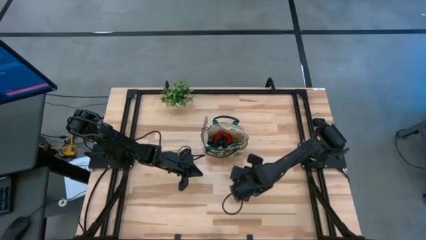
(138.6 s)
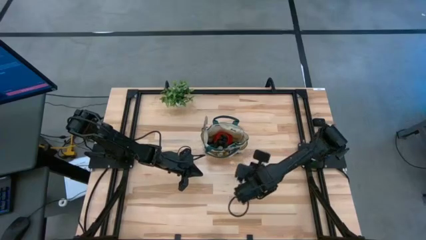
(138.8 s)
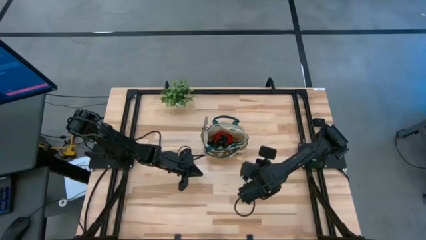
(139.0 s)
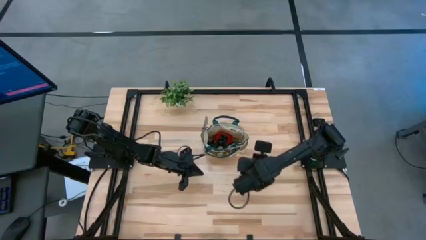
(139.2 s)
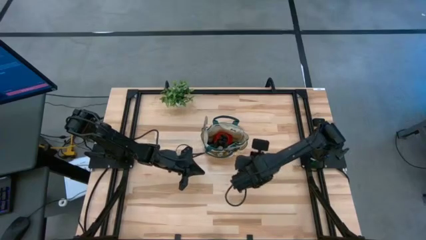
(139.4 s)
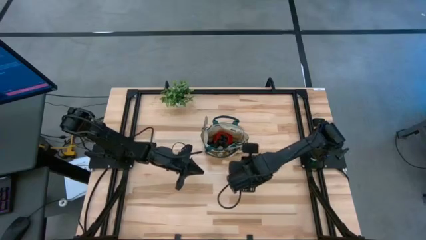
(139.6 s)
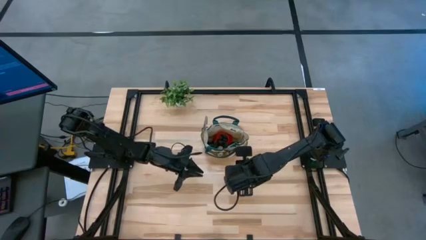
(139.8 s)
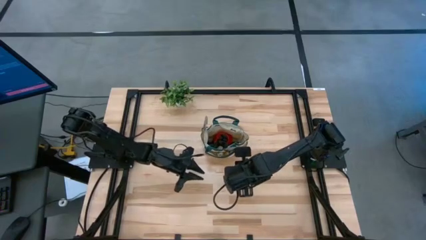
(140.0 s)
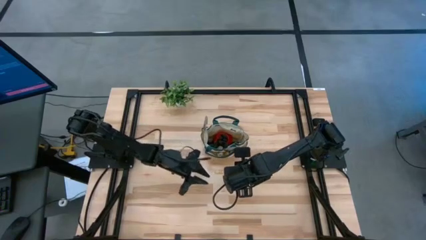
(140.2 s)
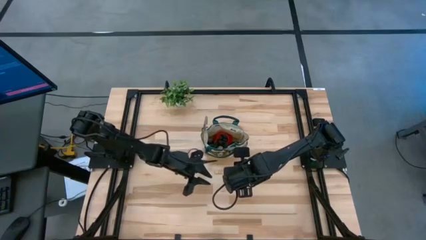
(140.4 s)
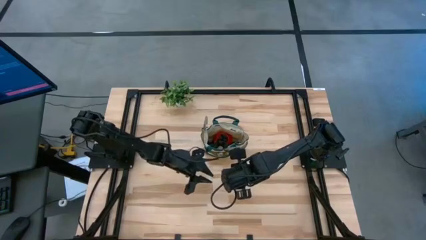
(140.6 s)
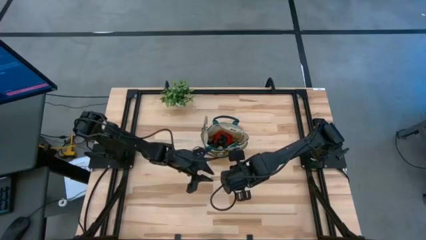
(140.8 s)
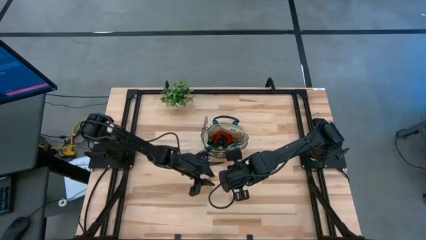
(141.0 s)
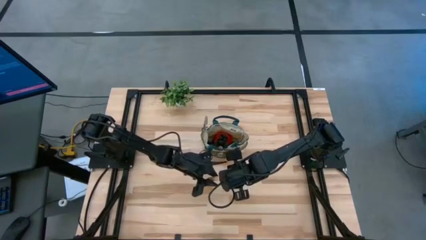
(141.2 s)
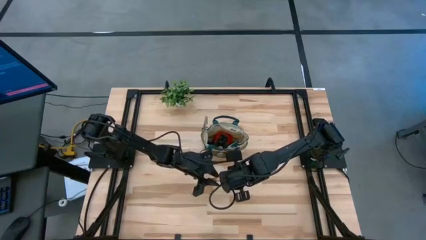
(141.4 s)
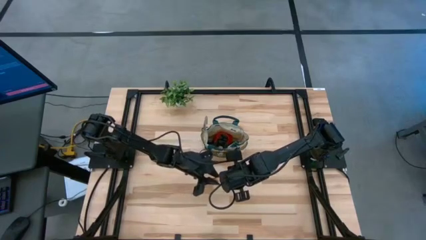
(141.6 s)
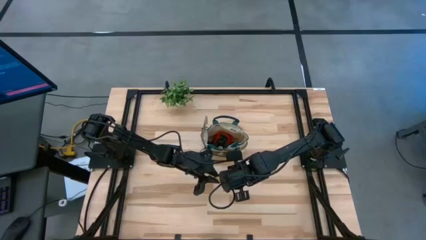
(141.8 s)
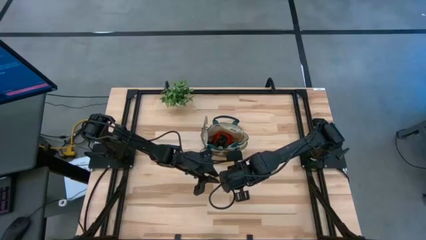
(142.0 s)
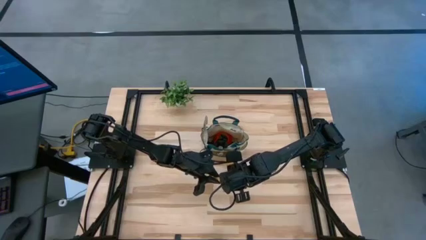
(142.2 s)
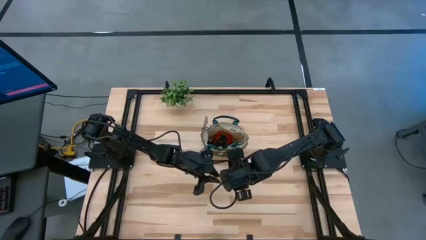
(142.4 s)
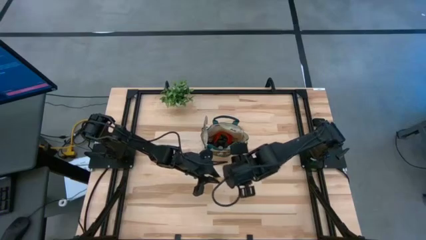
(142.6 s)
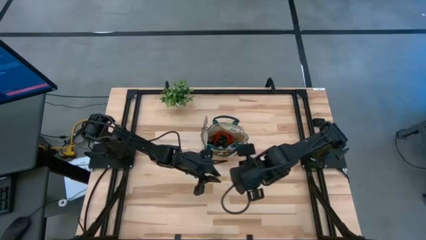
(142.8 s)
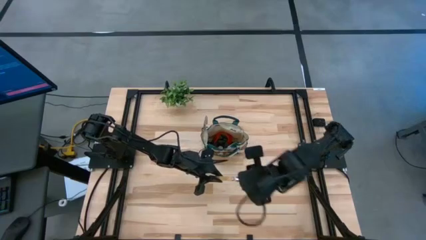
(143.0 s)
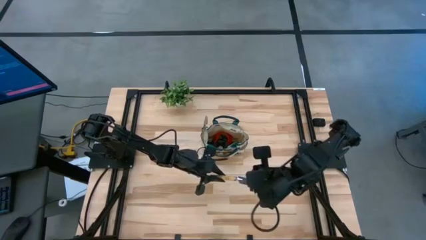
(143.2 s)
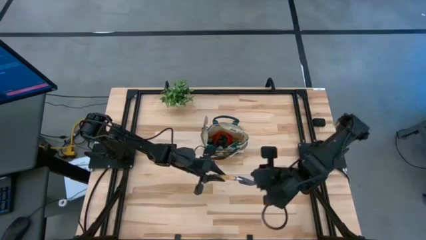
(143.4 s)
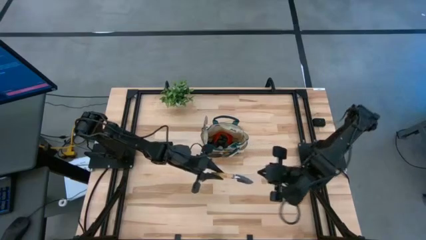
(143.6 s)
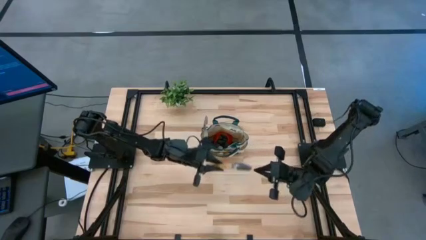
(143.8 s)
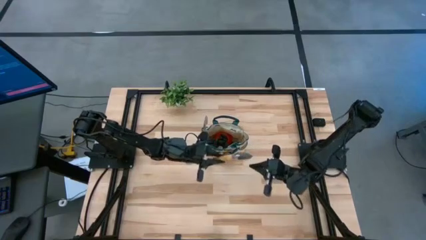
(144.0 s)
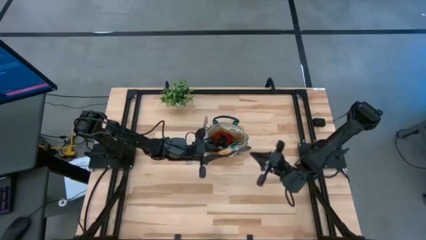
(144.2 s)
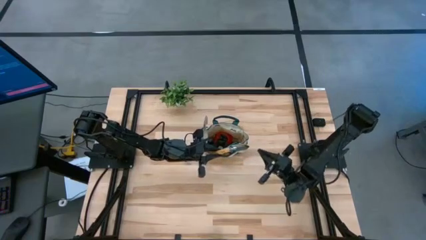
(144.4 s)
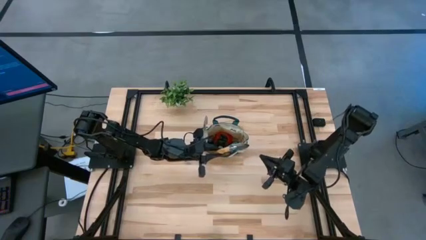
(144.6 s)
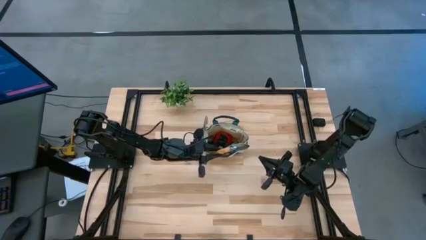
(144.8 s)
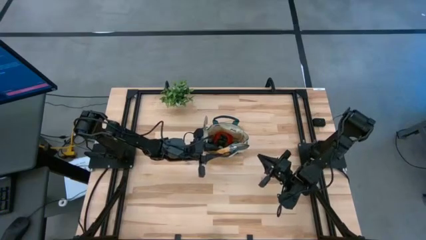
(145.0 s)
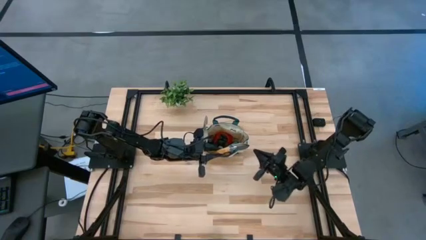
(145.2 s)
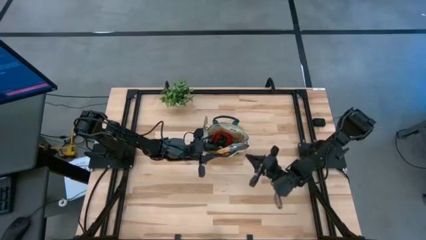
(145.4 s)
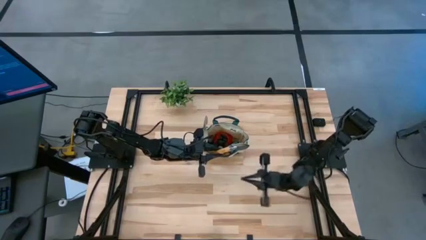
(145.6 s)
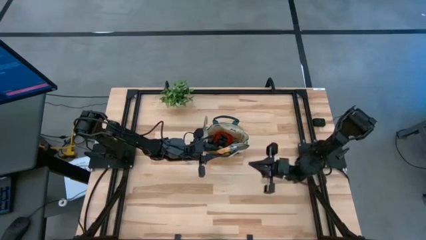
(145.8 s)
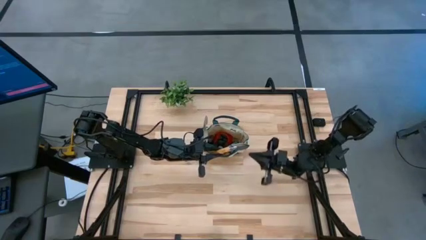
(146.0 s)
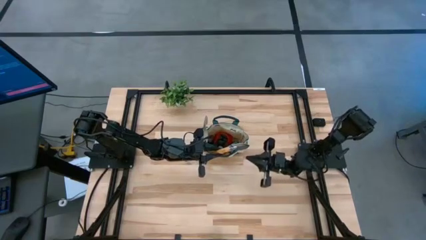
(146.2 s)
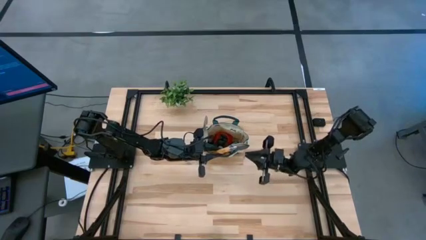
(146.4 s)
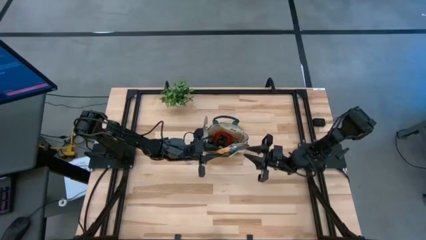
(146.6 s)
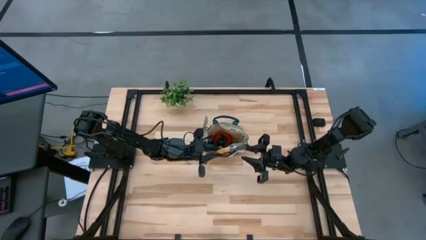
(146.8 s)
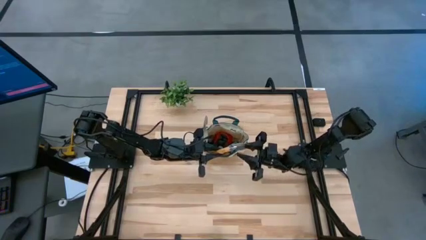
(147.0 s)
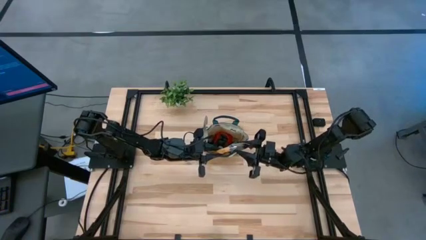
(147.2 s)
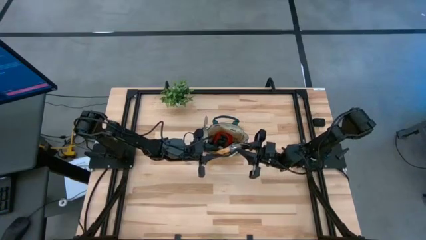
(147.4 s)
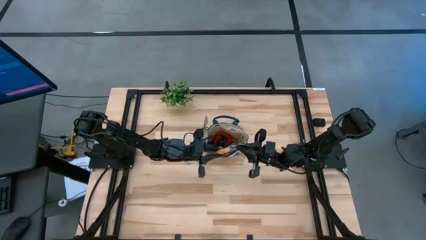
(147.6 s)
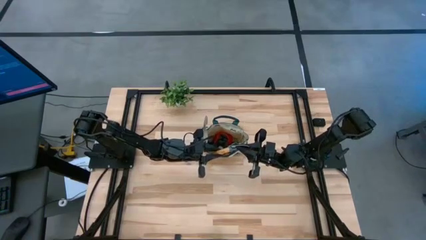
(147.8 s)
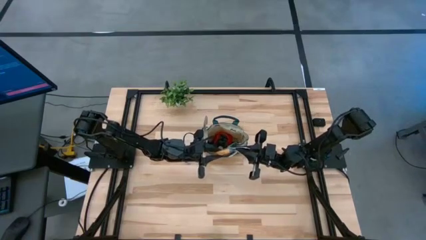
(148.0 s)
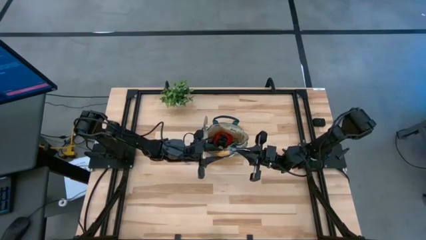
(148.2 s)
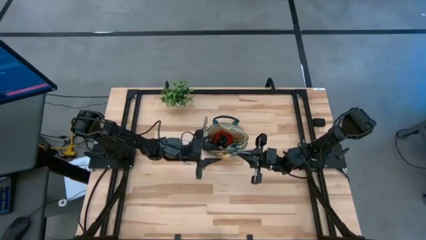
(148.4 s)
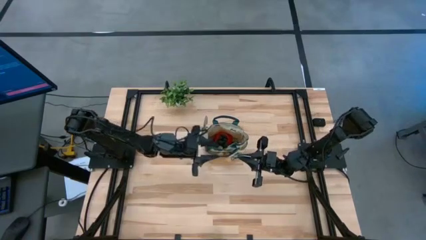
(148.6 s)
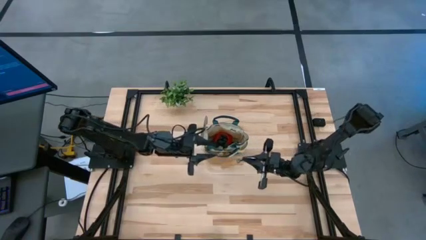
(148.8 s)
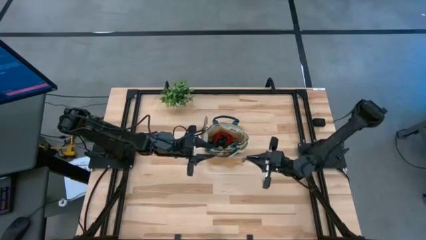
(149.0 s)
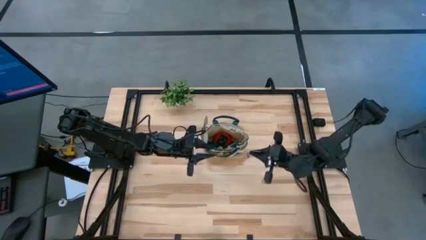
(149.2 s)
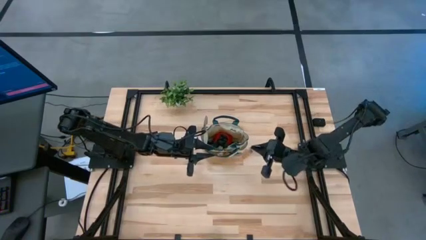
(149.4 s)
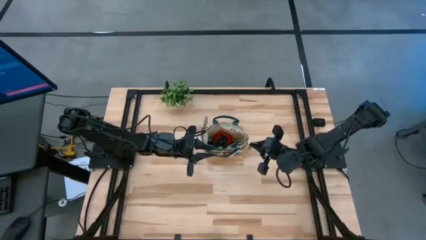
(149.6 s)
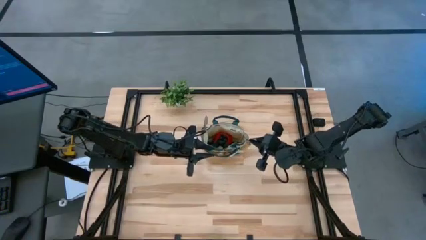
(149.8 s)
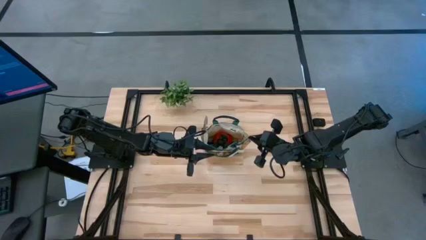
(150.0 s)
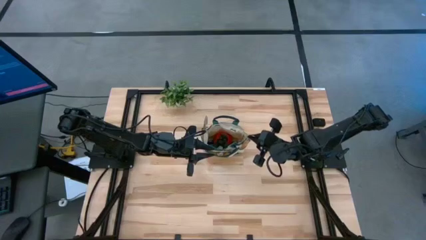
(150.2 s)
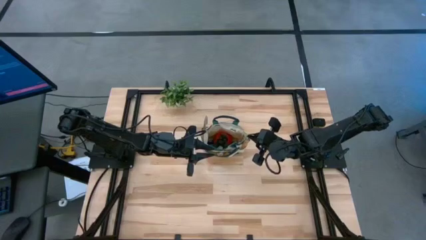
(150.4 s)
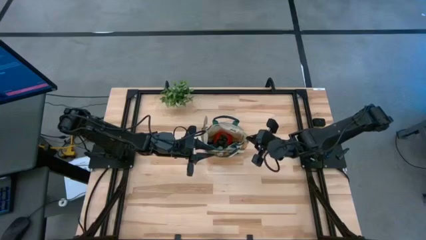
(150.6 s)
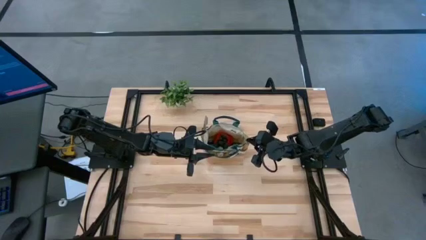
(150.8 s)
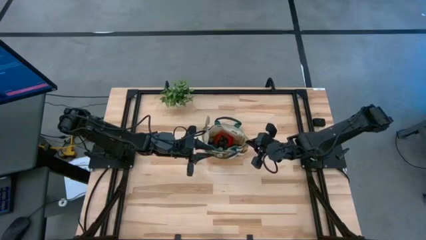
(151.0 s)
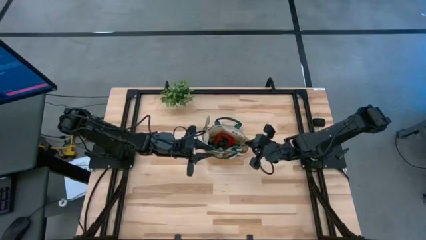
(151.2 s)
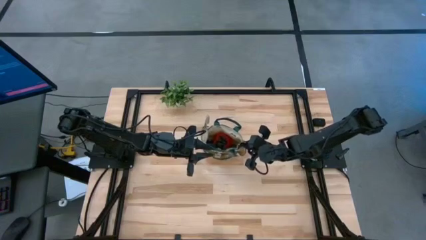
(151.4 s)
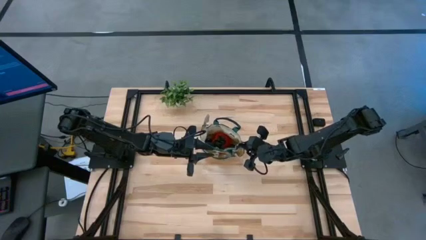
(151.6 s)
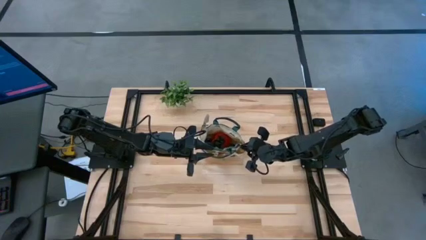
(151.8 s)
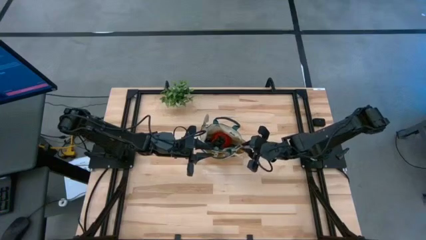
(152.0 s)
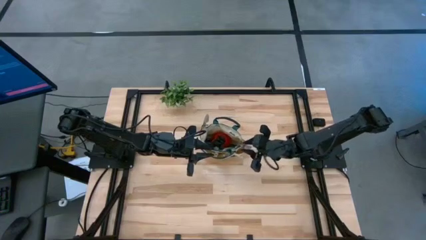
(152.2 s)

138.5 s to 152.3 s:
Task: Pick & Place Garden tools in Gardening bag
Put the trowel into the gardening bag

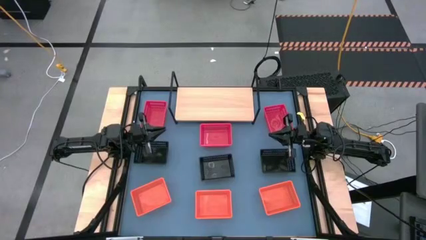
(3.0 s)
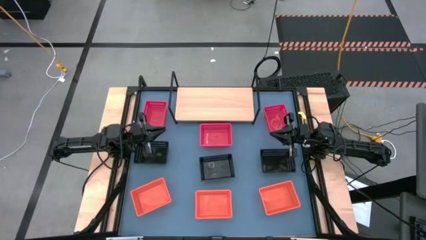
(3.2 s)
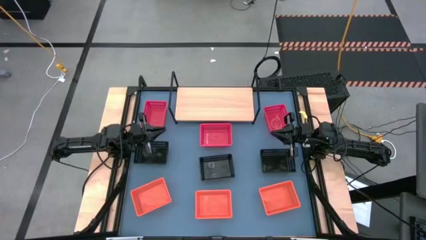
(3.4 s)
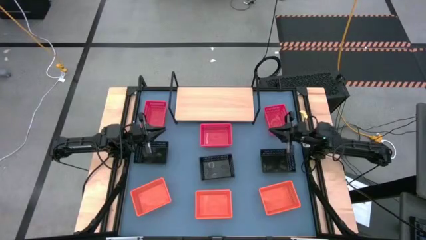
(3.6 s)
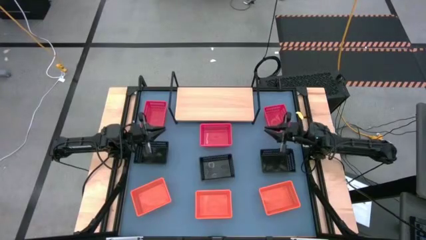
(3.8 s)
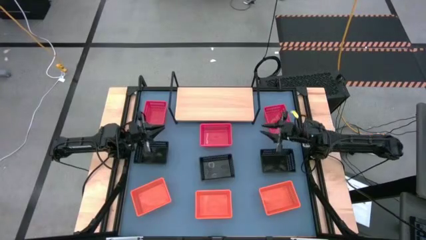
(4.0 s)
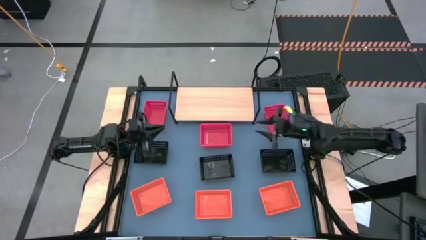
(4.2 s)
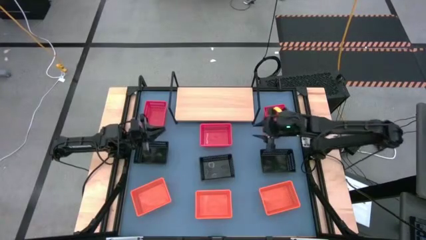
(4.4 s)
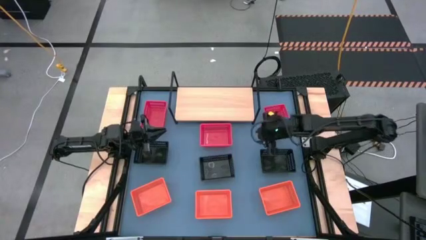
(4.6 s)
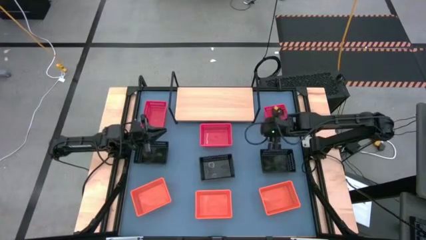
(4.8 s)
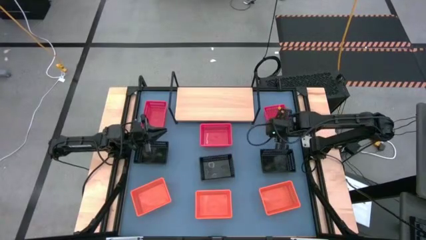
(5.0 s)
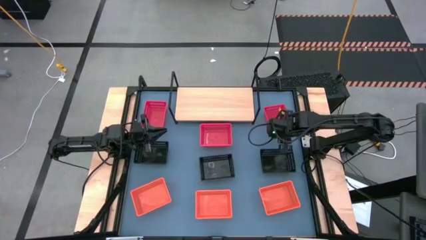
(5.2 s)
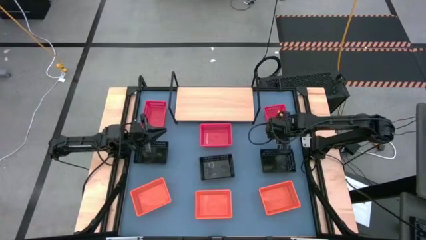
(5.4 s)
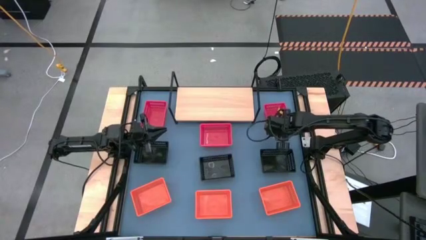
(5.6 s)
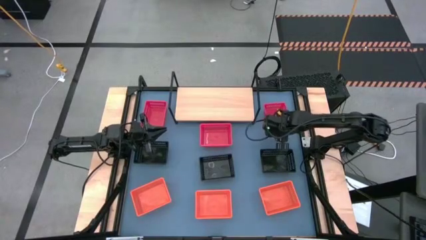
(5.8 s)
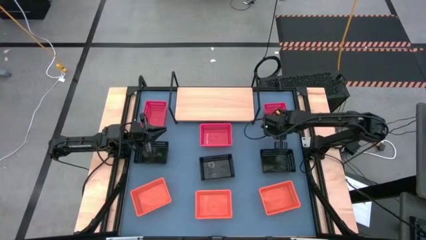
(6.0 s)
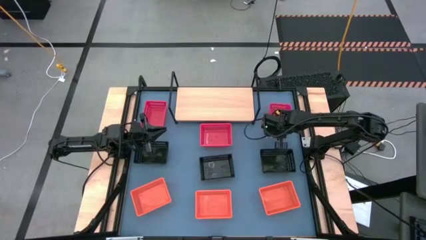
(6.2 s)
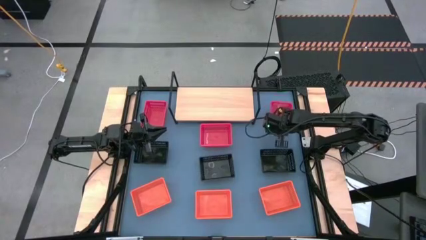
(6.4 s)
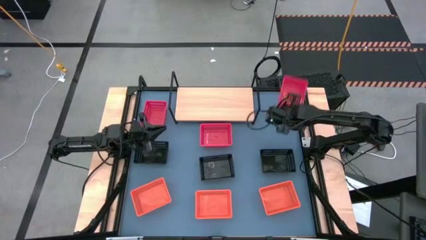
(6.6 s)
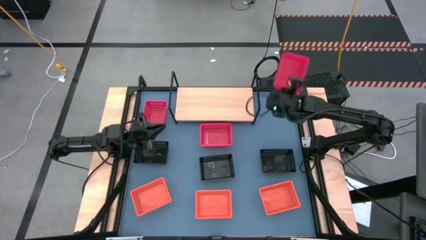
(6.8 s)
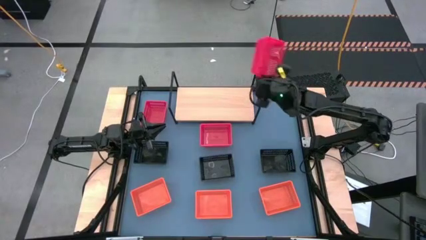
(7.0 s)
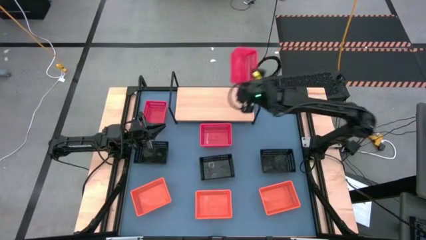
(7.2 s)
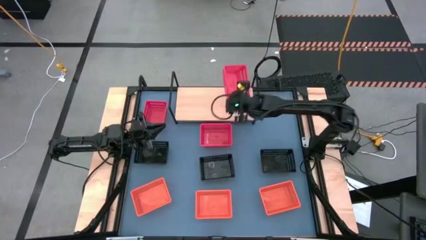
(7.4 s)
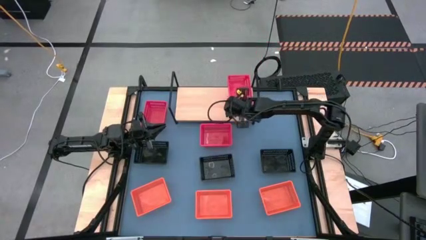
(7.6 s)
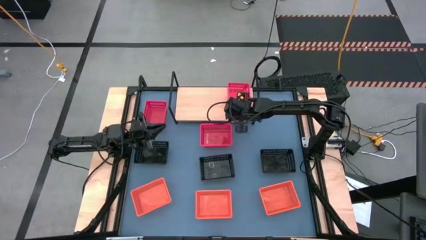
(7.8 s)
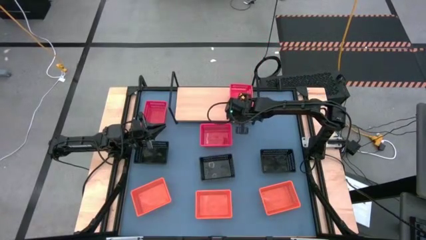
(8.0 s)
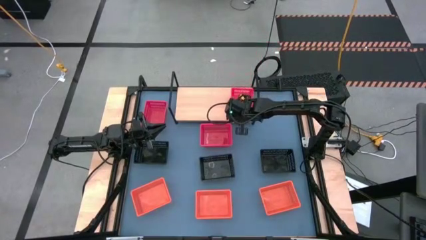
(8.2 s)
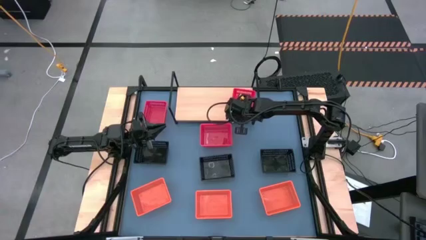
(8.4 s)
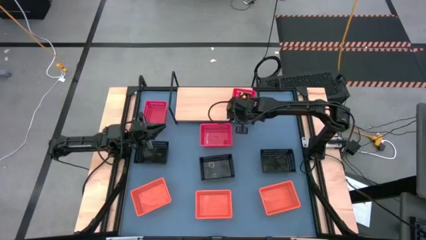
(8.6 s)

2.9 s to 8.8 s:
Task: Stack baskets on shelf by color
Put the top right red bin on the shelf
